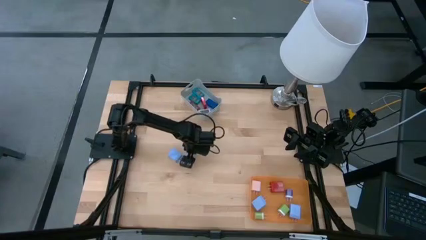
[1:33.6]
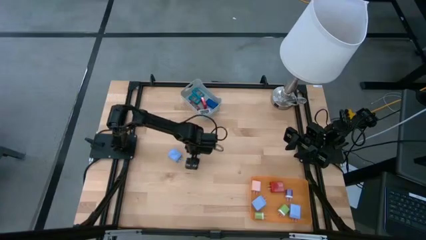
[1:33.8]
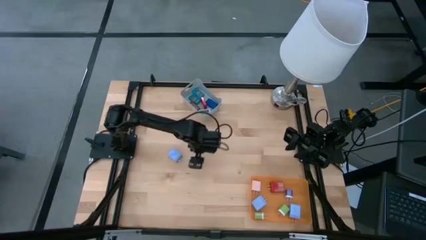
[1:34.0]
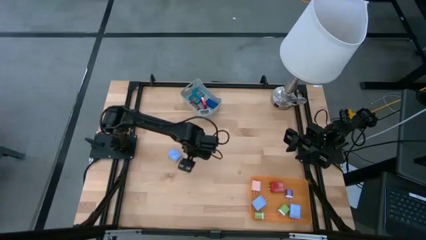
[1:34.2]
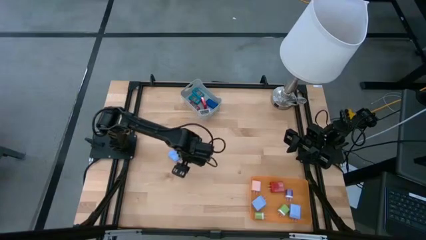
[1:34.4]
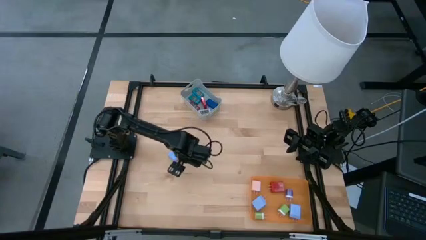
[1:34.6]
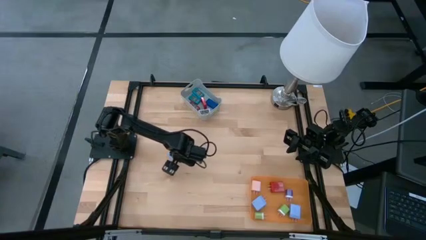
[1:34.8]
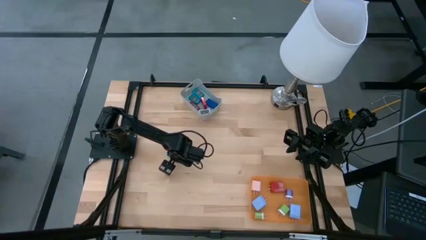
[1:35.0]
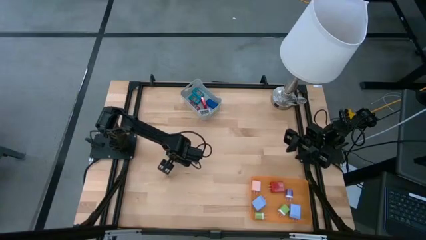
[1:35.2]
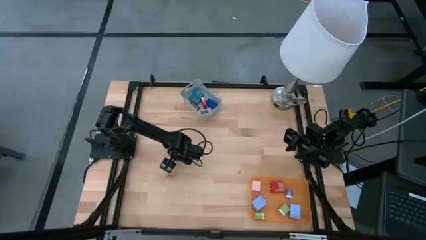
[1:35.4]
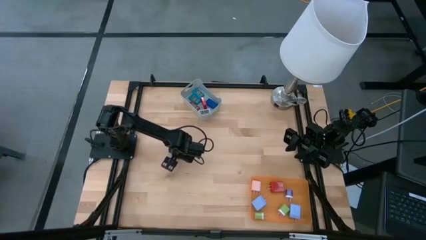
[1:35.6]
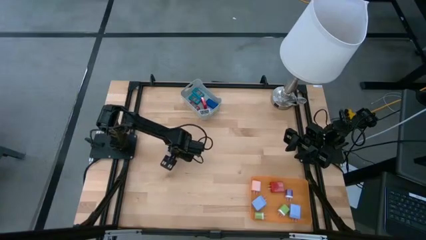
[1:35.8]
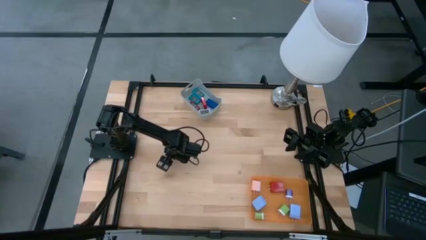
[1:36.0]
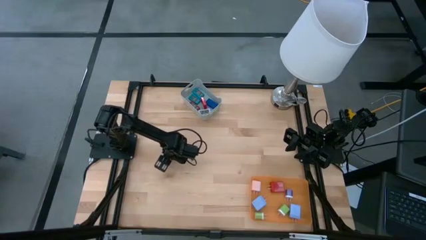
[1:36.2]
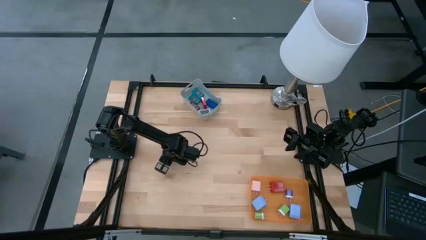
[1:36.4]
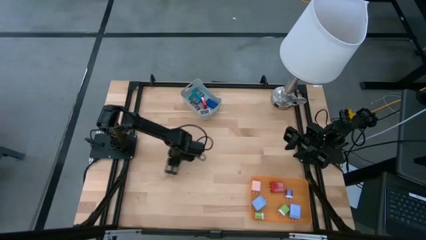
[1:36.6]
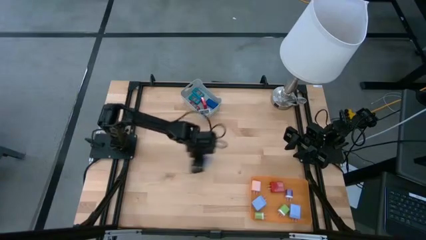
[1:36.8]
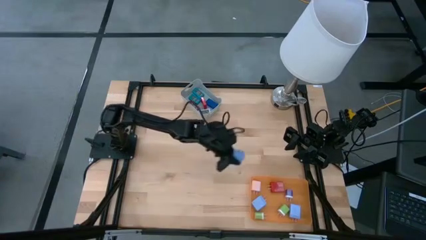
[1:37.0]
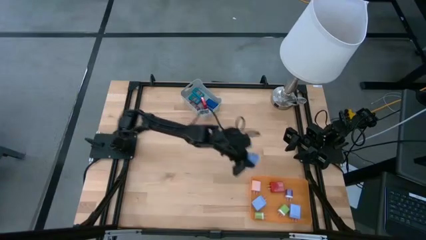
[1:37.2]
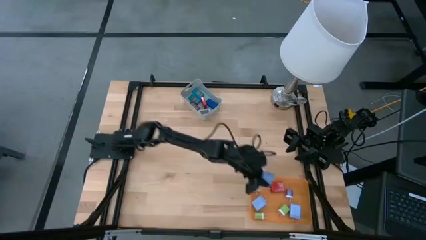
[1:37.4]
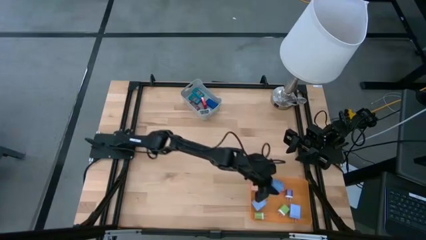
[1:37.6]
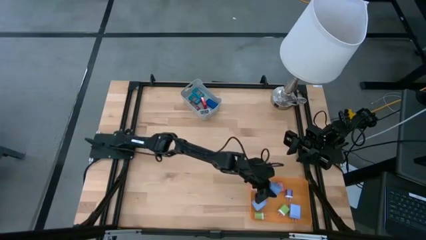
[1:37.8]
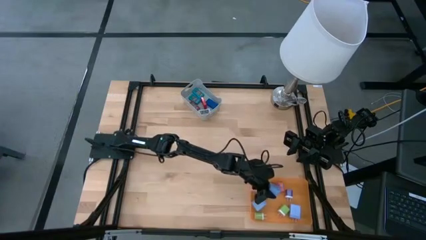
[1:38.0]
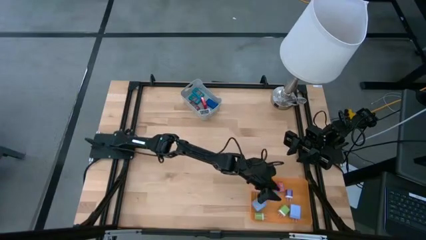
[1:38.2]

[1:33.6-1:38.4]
Task: Pick & Place Office items
Put the light blue charger adapter into the orange bin

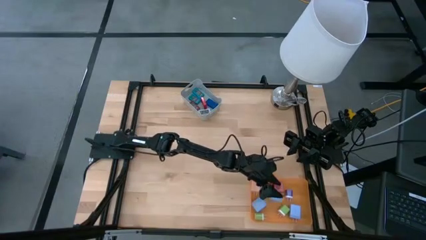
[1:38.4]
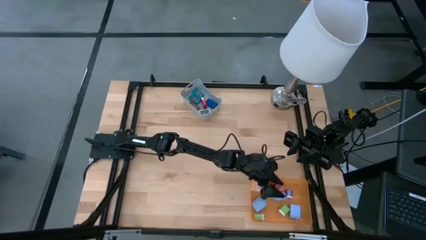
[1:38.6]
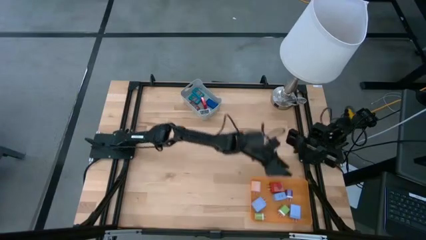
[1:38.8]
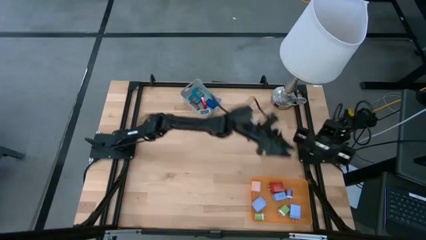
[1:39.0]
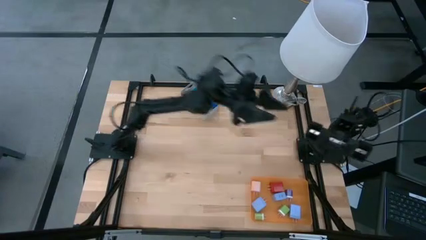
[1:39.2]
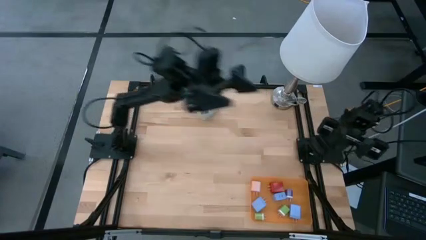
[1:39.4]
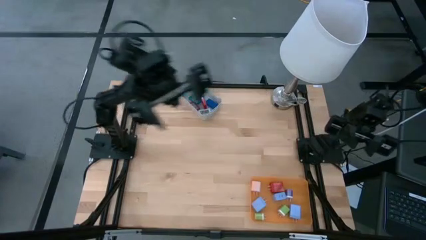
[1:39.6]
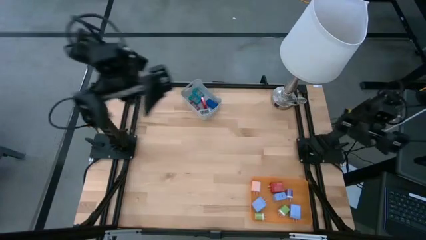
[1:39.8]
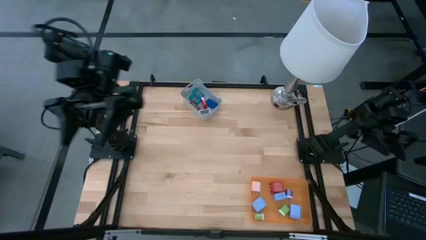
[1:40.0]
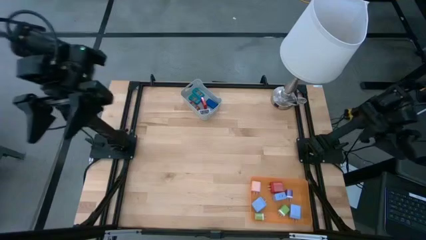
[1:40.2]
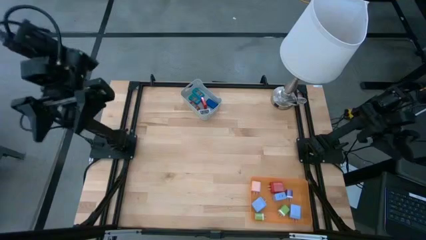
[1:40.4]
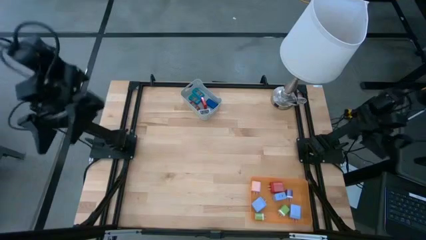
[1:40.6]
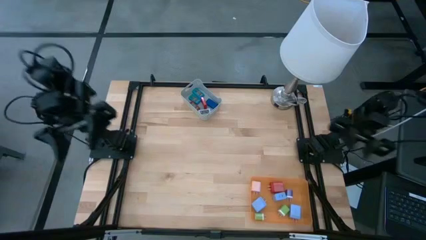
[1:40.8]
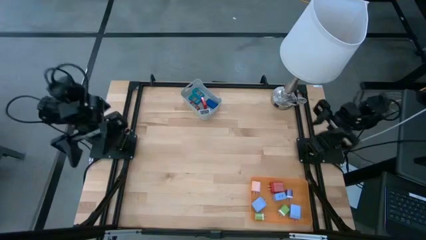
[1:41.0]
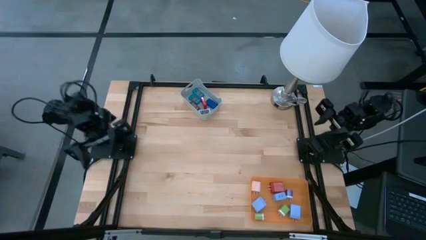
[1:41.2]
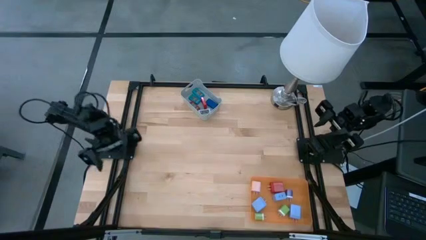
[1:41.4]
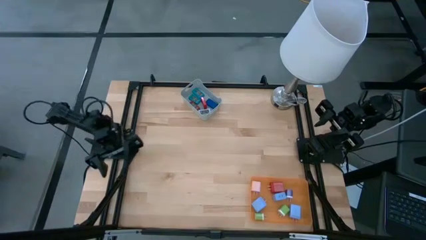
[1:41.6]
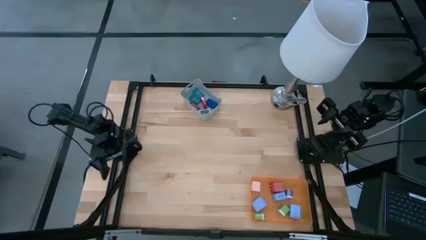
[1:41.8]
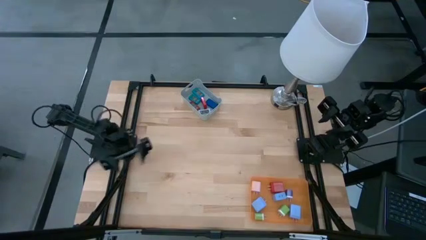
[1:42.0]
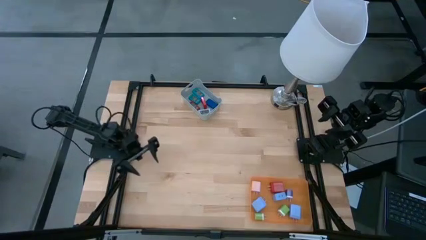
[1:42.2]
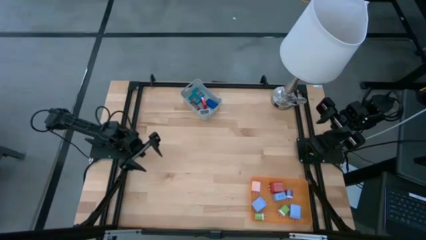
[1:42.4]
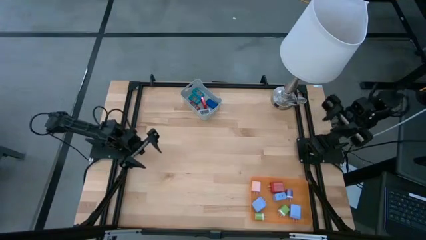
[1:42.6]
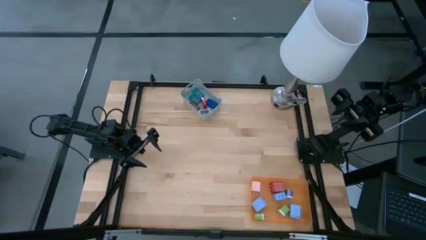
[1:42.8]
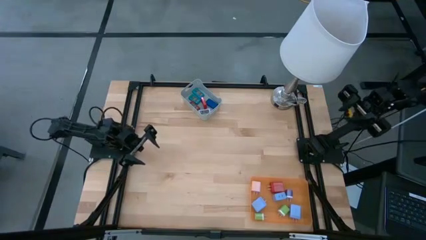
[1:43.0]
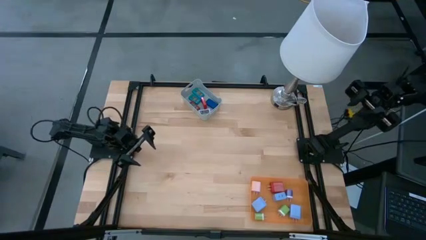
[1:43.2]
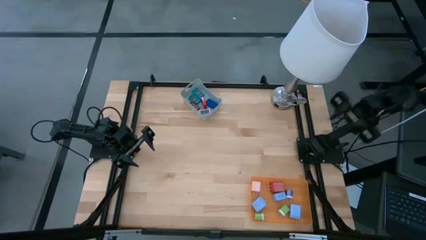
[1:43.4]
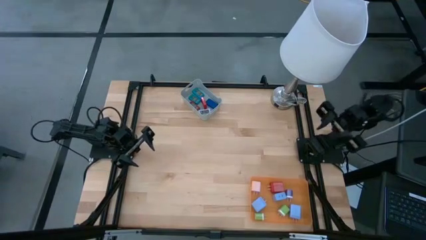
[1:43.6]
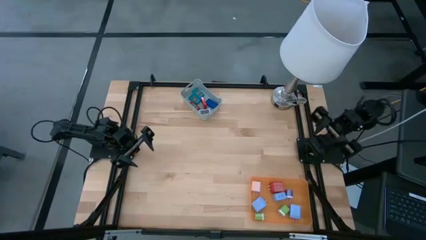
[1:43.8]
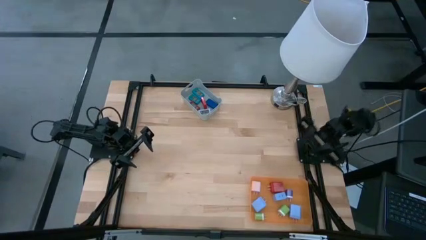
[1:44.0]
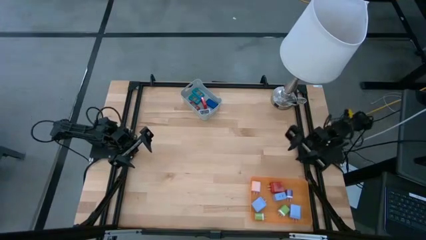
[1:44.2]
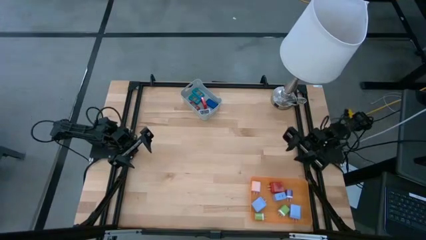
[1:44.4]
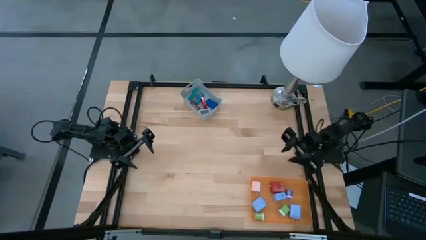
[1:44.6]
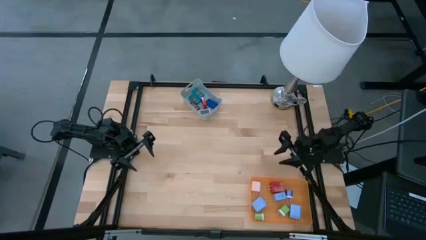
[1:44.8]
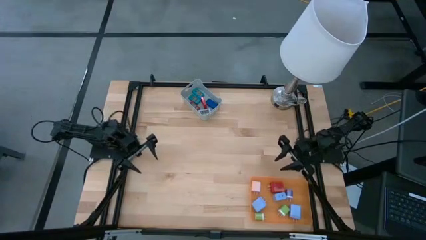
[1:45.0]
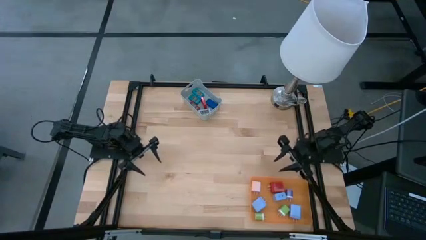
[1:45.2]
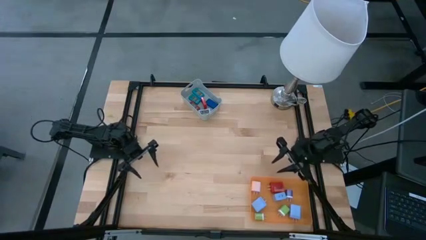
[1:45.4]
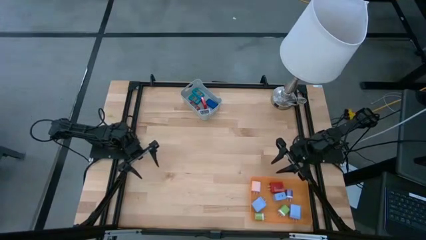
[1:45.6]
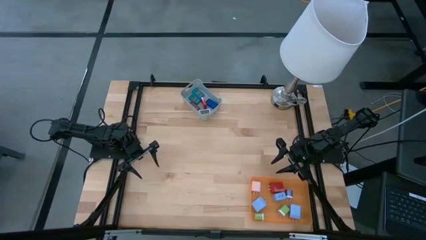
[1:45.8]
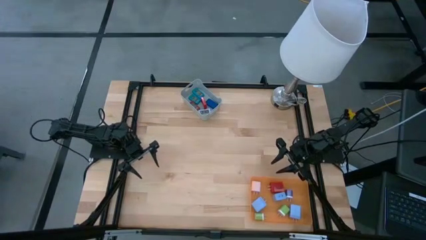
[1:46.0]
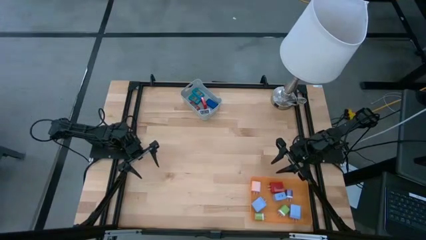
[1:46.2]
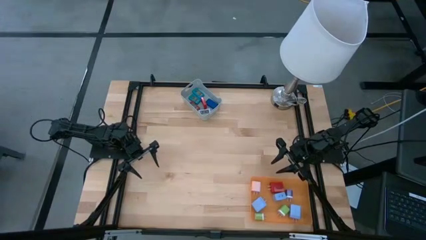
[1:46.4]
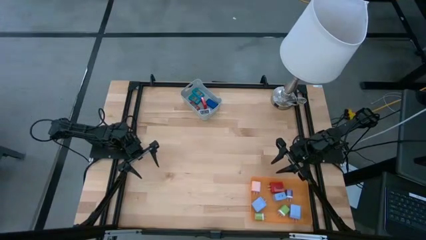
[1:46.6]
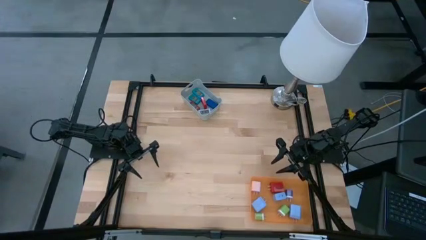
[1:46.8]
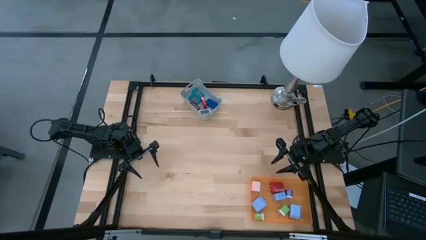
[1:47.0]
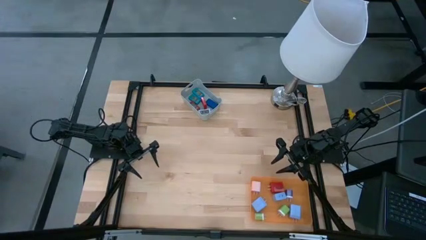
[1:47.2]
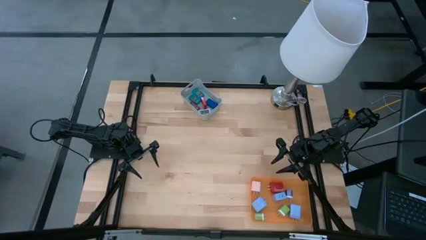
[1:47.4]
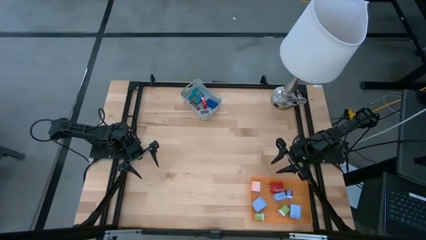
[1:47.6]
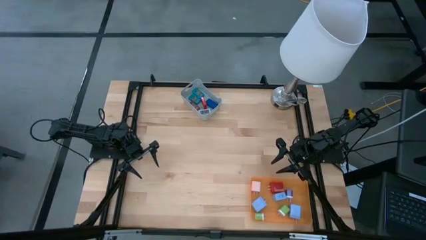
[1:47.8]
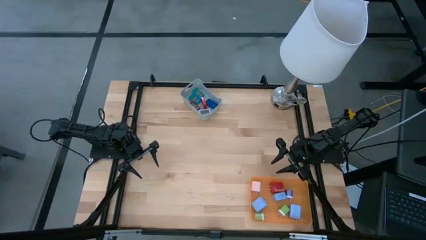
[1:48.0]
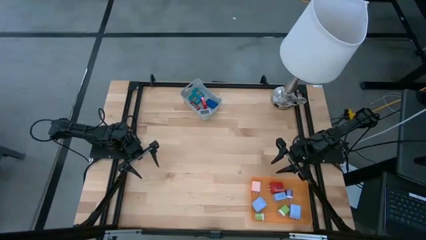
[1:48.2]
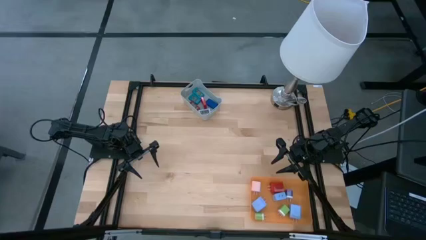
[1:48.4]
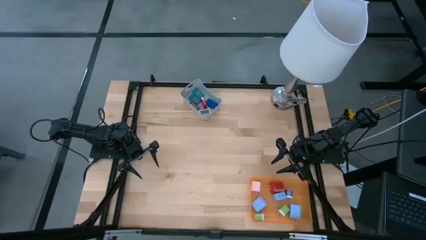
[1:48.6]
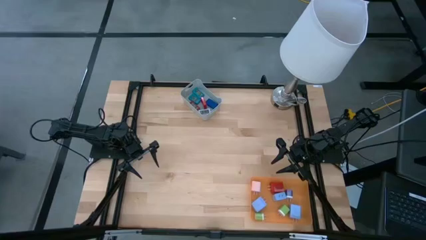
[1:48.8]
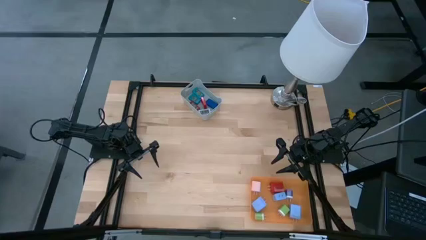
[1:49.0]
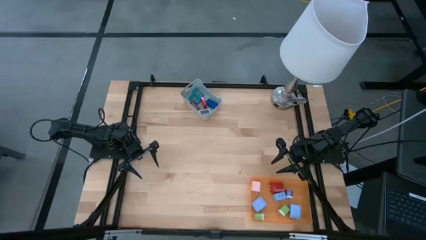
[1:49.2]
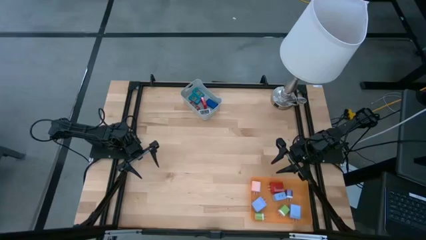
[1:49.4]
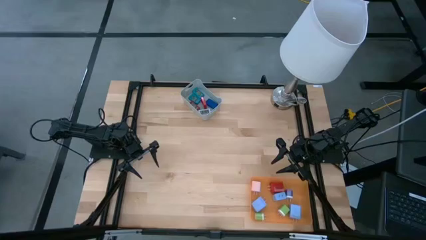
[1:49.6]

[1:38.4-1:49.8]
Return to Home Position
